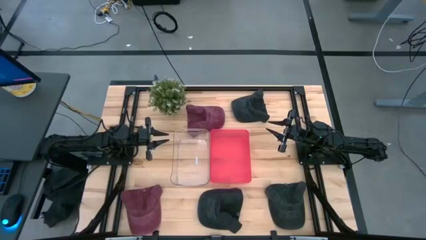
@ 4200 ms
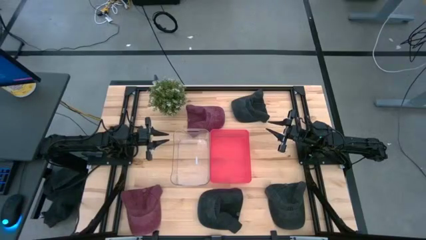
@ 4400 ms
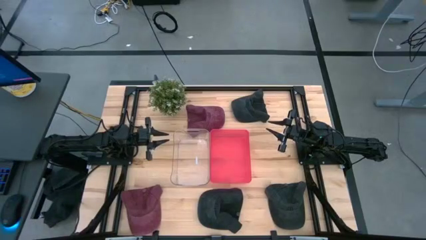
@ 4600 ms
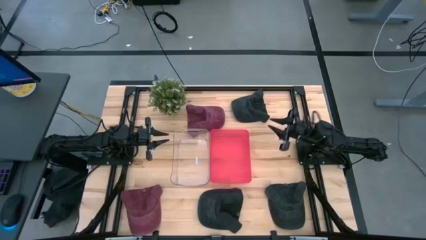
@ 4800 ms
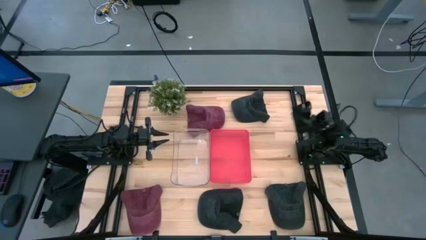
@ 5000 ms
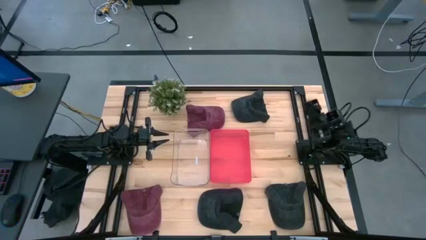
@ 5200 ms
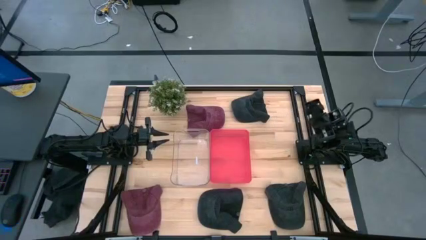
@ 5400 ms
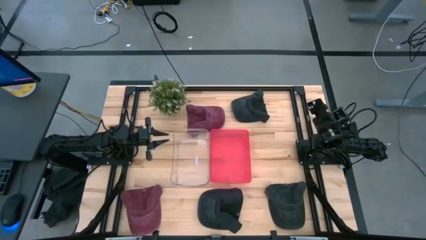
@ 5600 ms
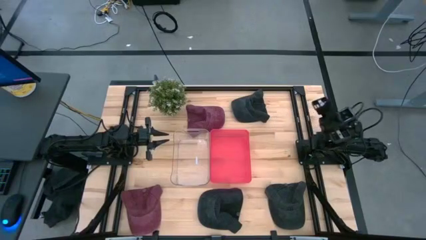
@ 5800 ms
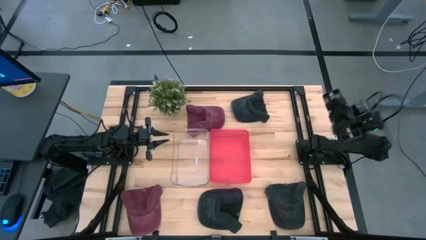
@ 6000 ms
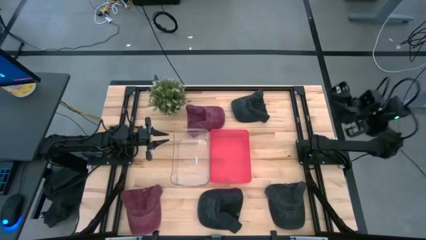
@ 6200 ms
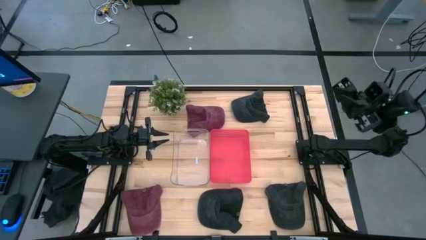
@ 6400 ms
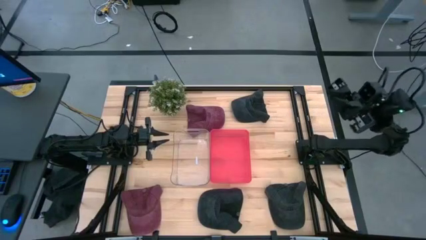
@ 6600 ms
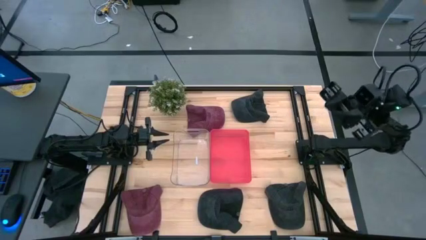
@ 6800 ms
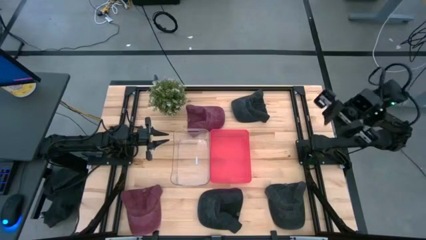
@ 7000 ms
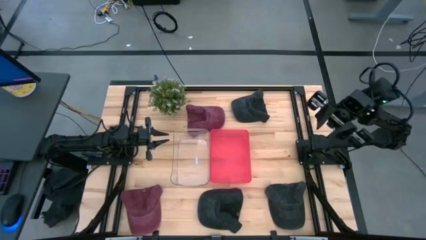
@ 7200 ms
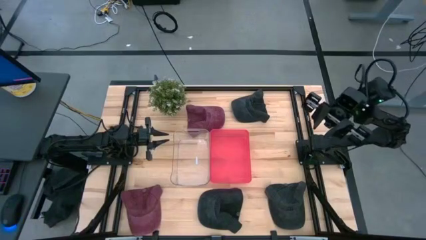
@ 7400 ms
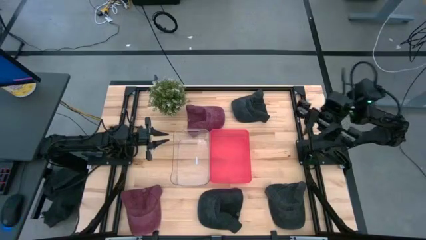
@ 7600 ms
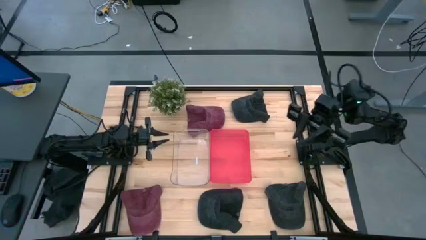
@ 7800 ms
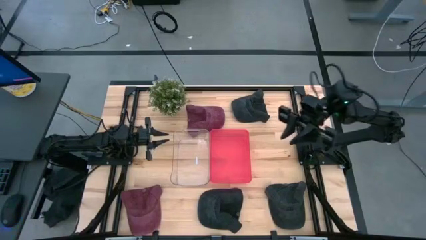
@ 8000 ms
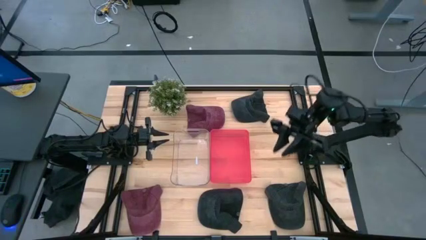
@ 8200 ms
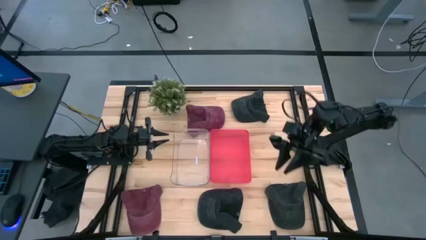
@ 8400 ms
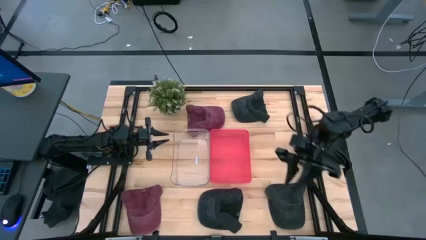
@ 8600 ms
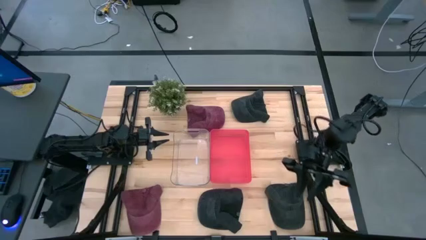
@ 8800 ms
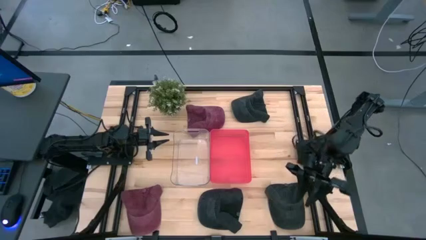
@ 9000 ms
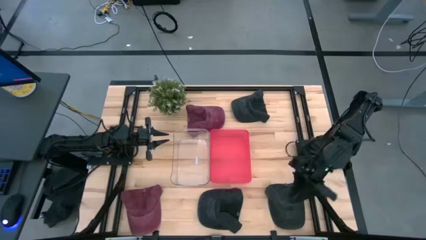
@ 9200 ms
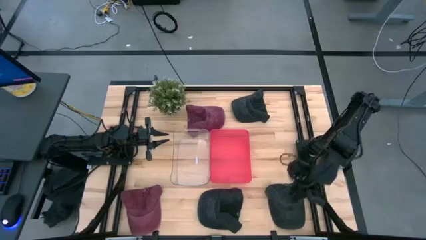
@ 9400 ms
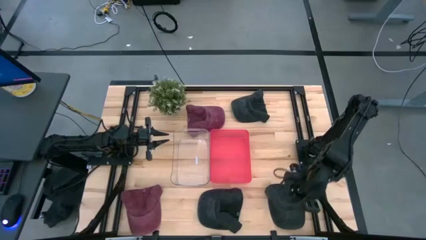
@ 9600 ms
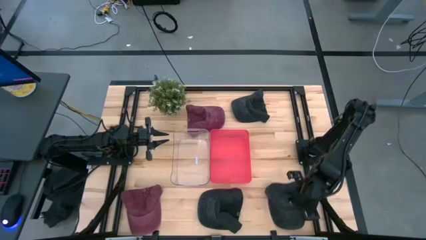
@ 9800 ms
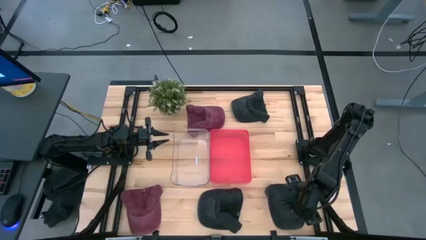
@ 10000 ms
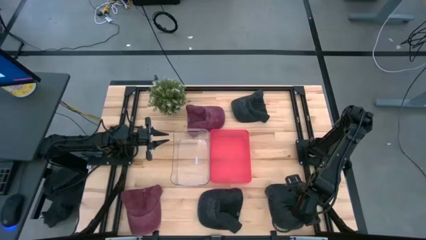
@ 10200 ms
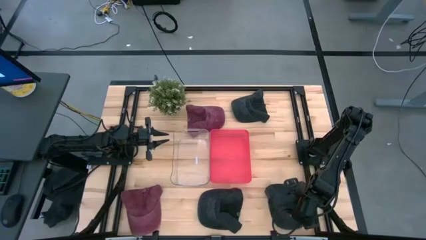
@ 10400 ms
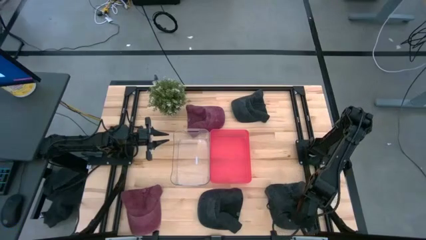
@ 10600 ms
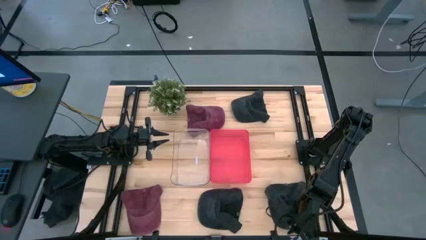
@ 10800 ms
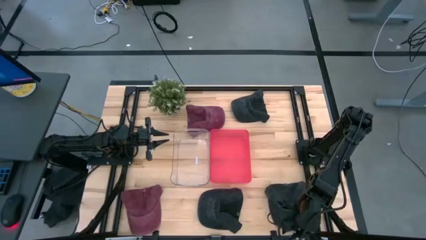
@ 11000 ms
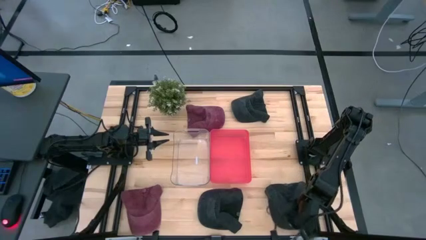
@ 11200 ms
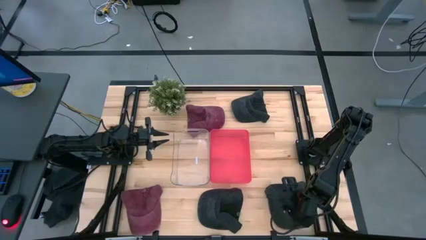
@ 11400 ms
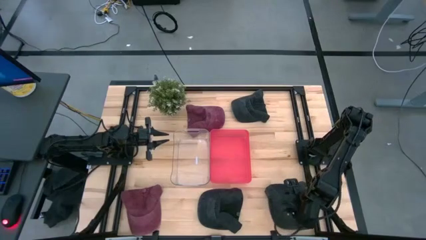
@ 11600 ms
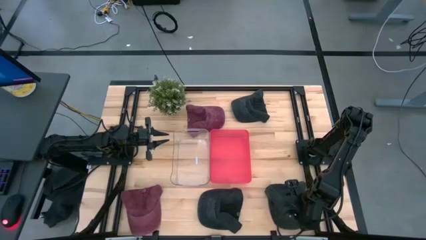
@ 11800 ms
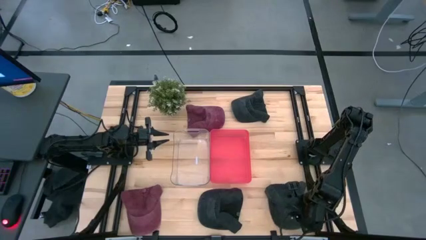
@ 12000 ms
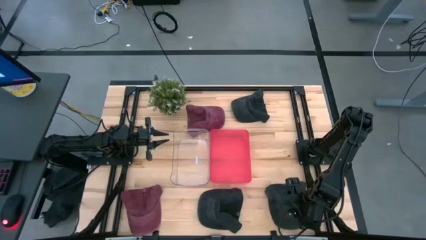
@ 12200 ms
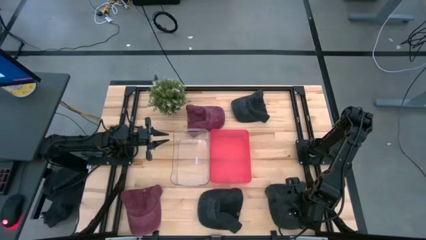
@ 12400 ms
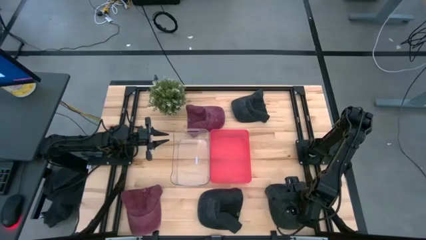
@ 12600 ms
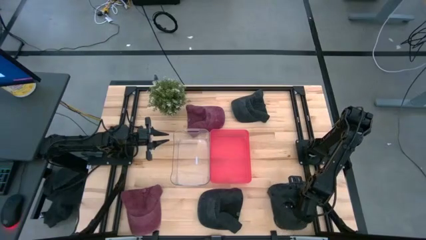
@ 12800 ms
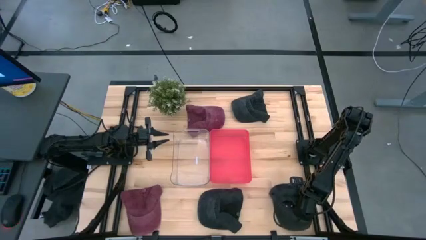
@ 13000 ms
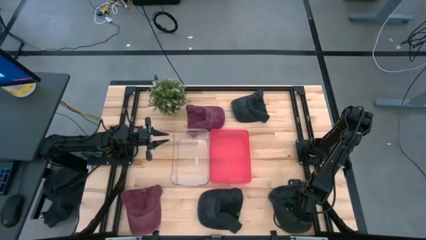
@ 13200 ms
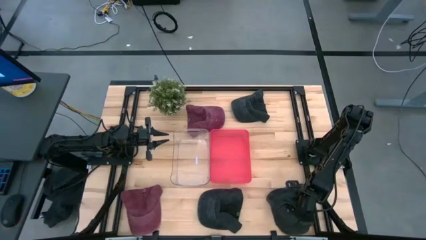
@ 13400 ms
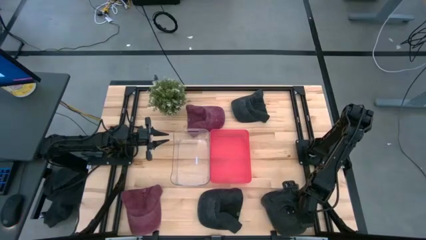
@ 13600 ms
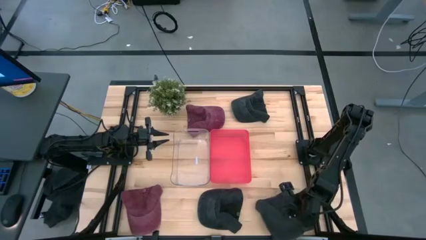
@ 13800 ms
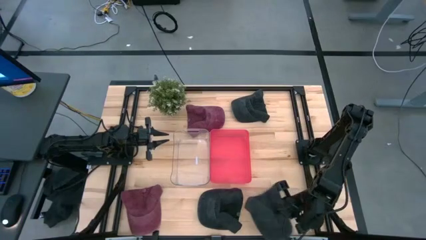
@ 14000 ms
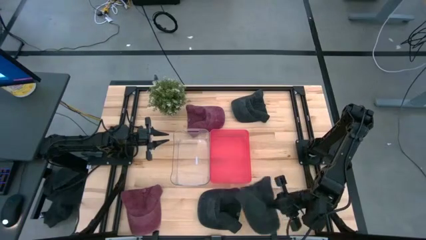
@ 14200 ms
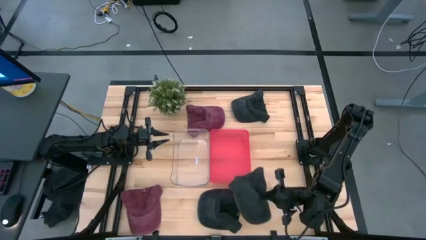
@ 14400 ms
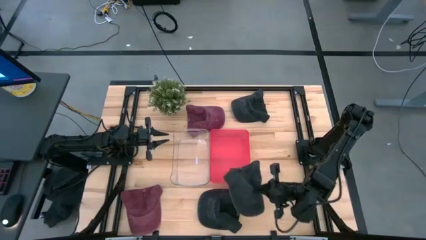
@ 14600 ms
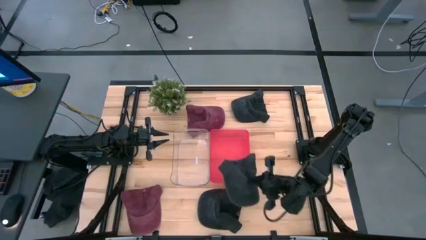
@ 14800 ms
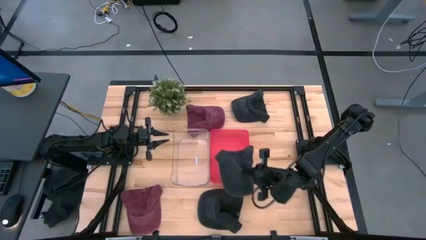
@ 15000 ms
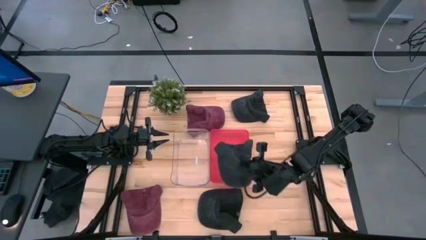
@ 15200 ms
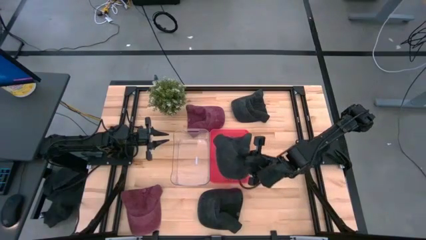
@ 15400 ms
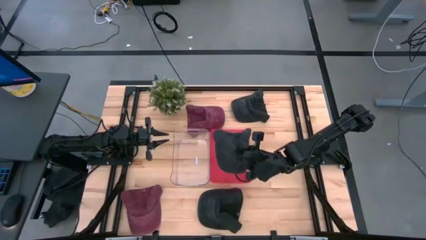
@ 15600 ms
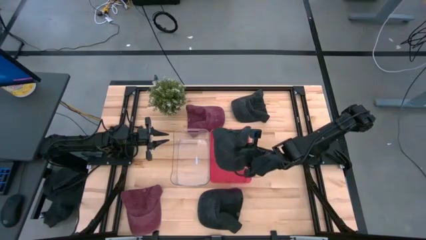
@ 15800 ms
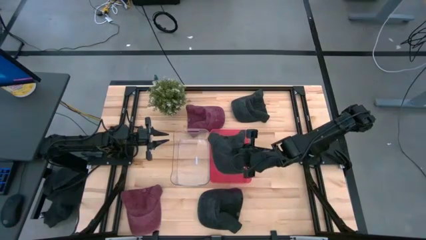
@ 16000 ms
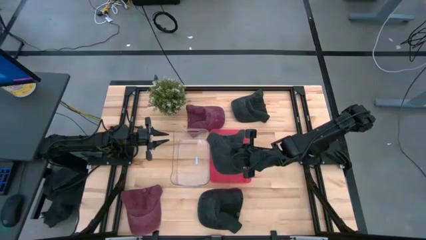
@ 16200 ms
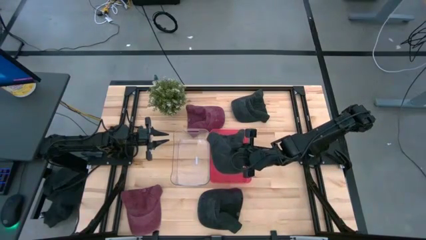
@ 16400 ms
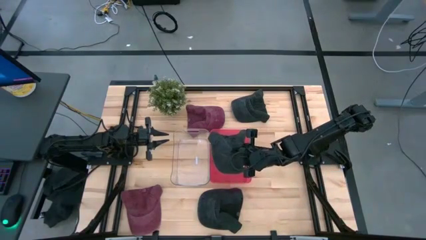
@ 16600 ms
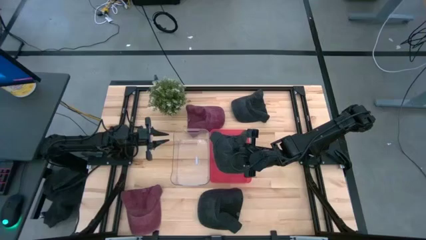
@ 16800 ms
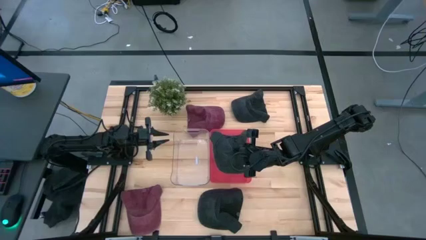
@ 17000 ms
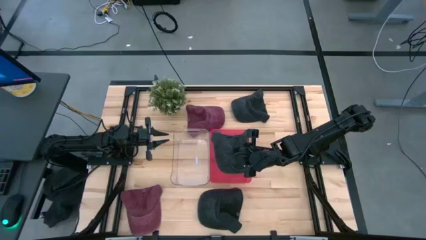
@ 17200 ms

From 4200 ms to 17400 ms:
Task: Pick & Place hat
Put the bottom right black cap into the red bin
